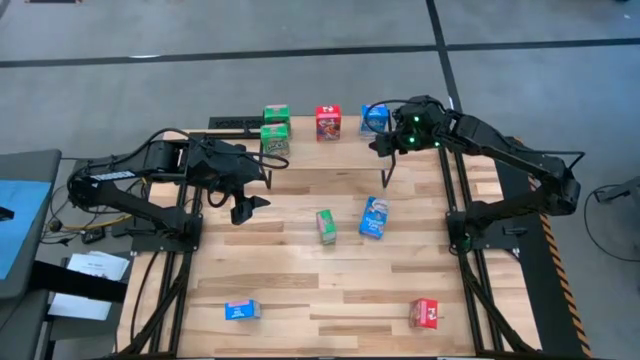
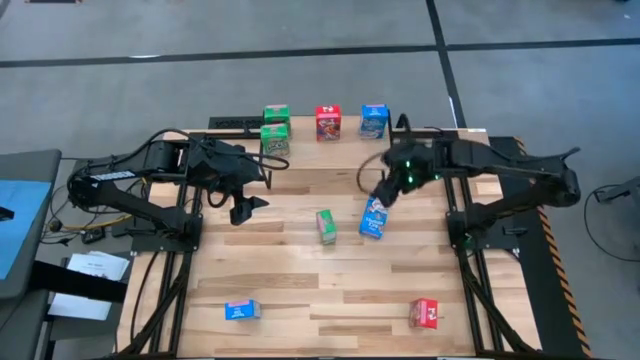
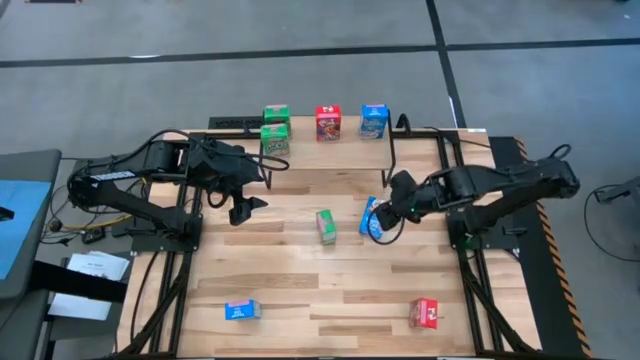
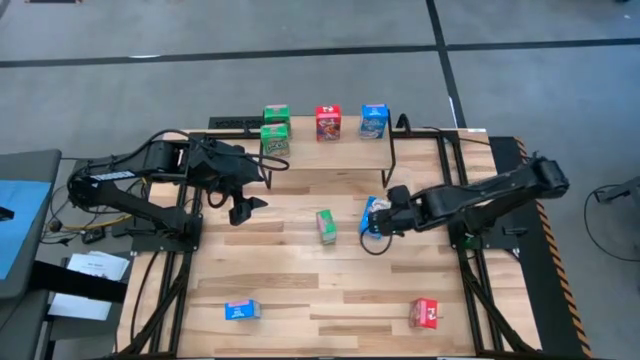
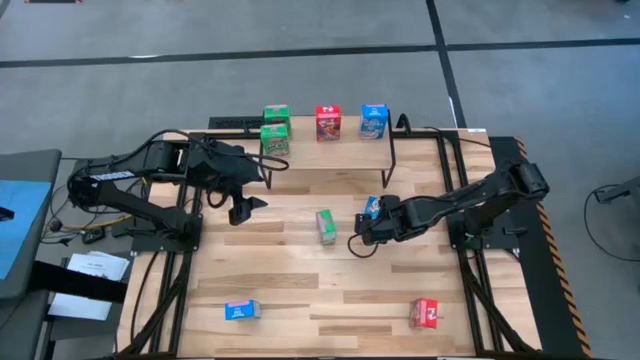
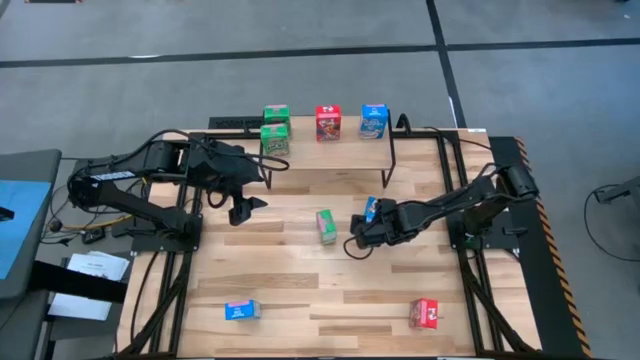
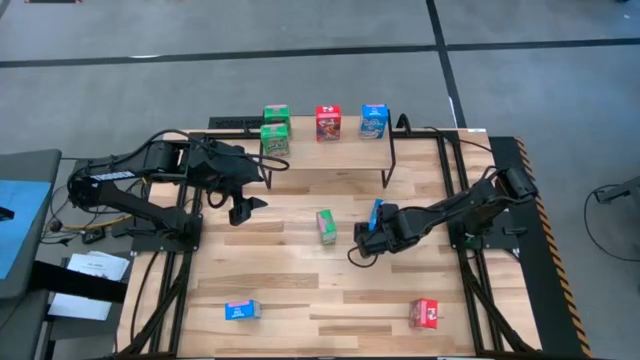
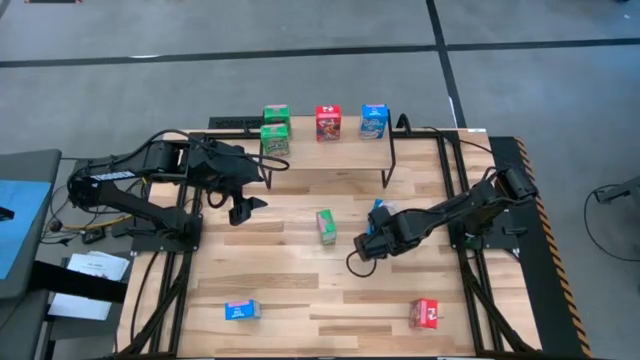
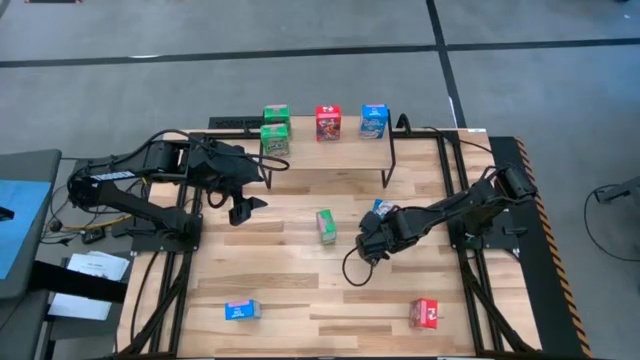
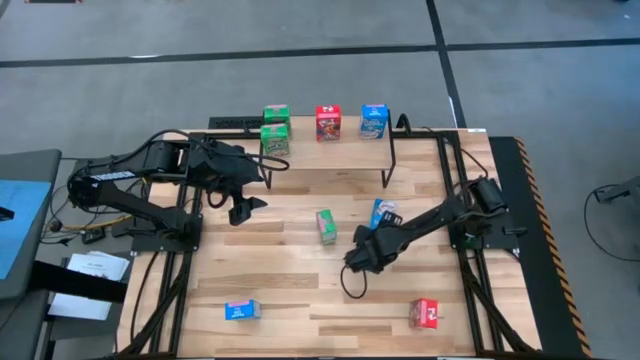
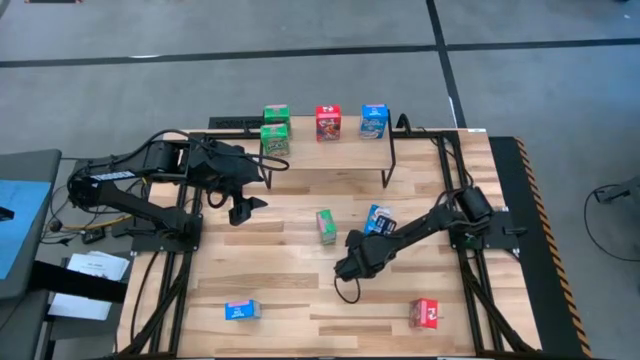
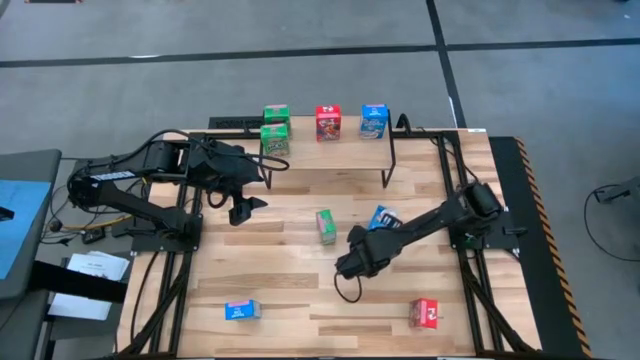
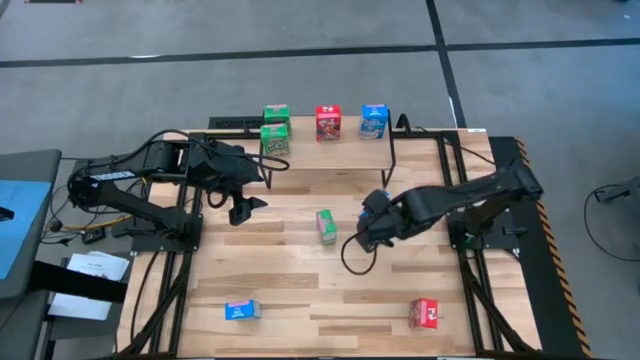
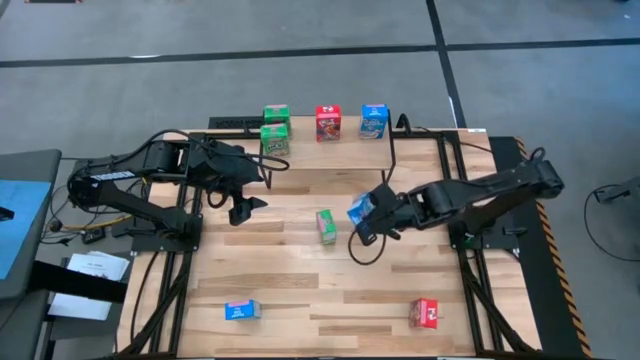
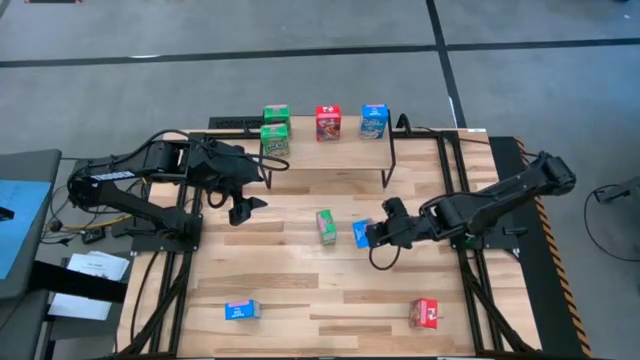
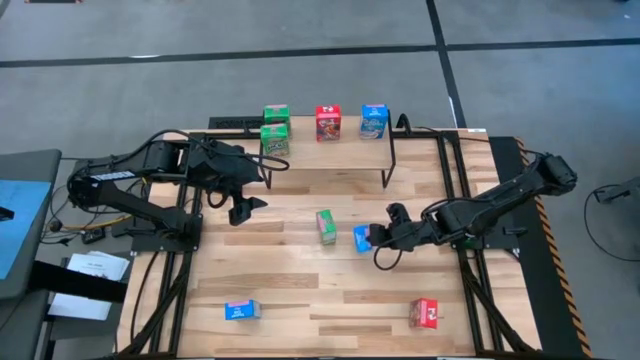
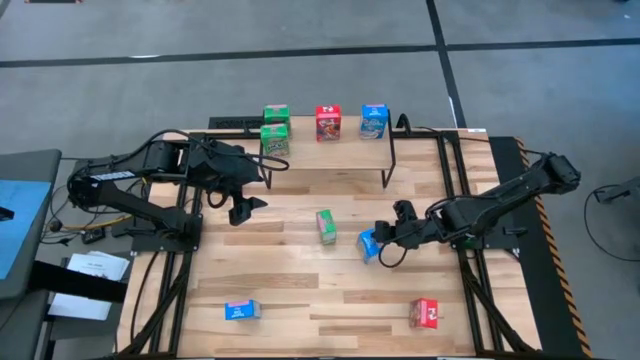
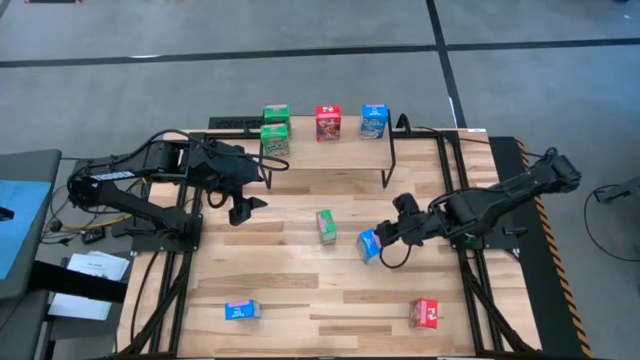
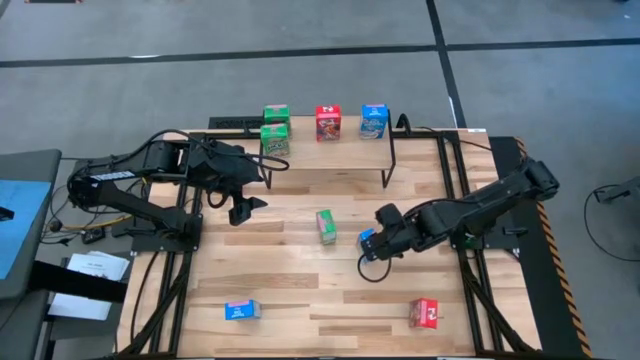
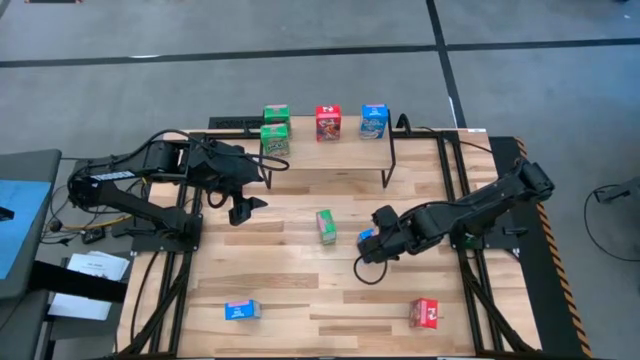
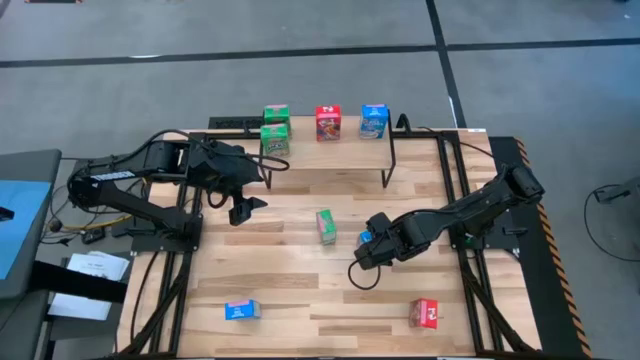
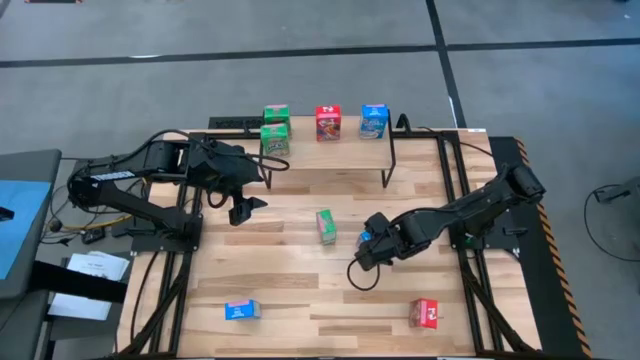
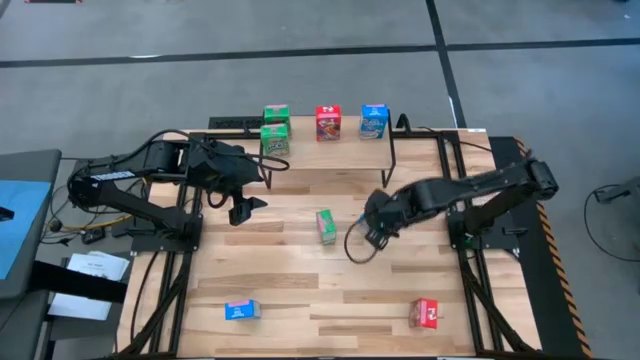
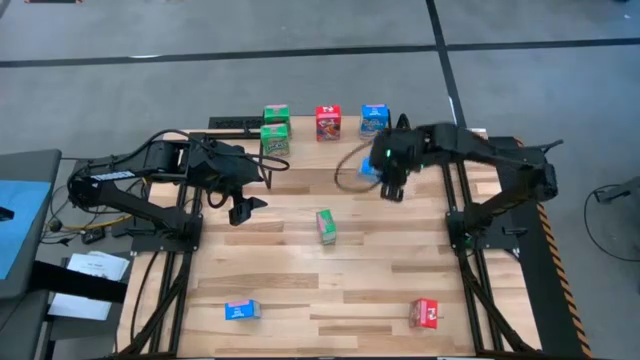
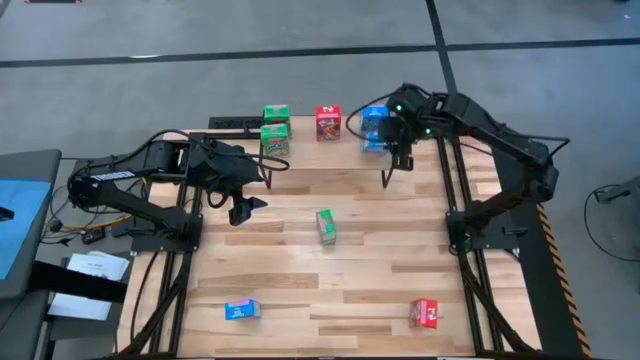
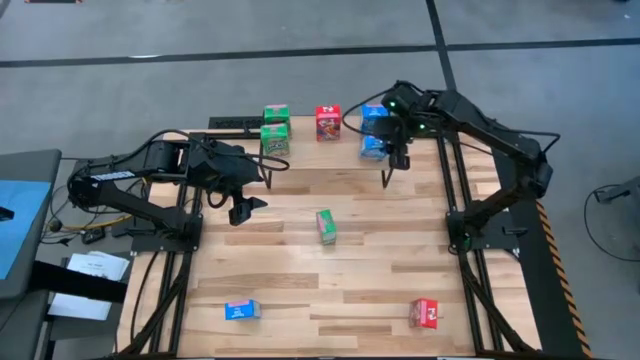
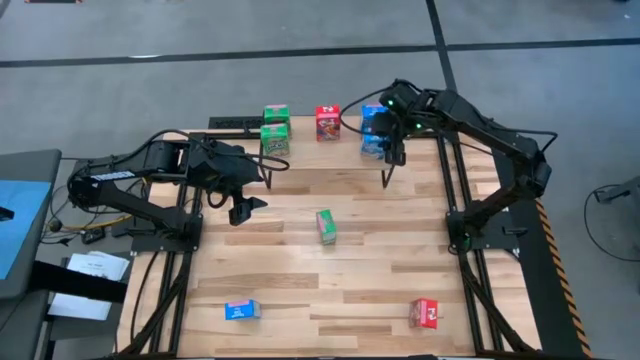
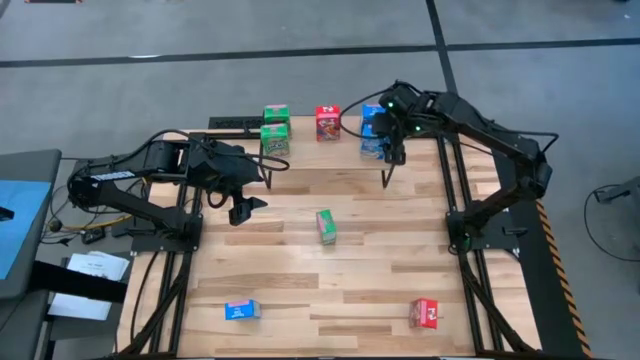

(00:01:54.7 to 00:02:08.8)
Task: Stack cereal on shelf
Put the right blue cereal box on the shelf aligned with the other blue cereal box

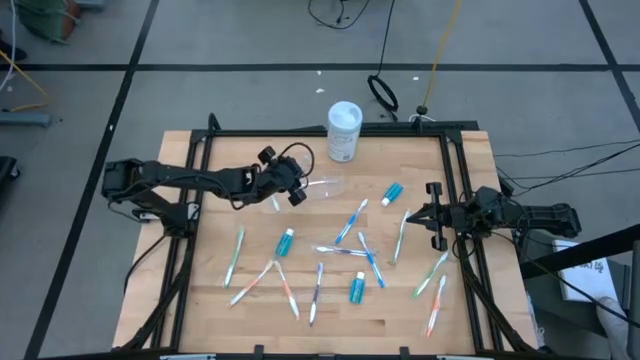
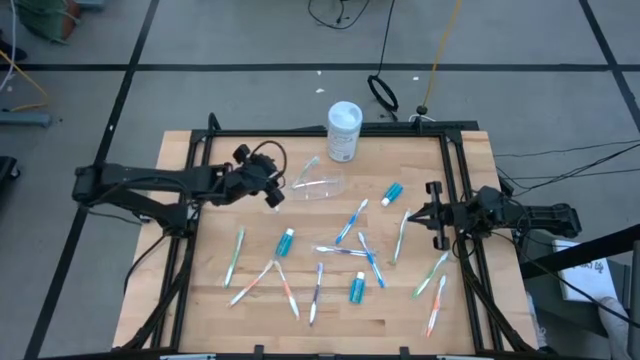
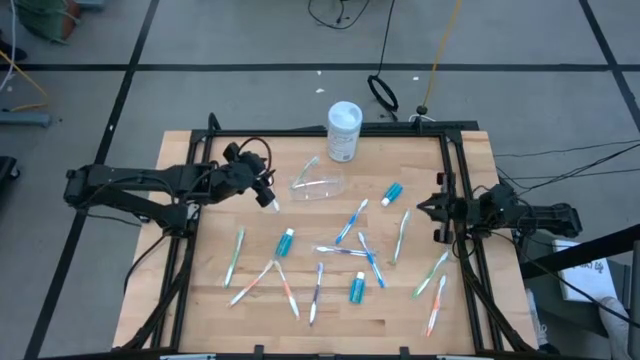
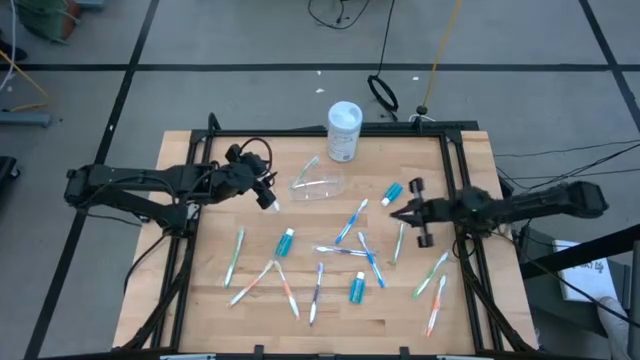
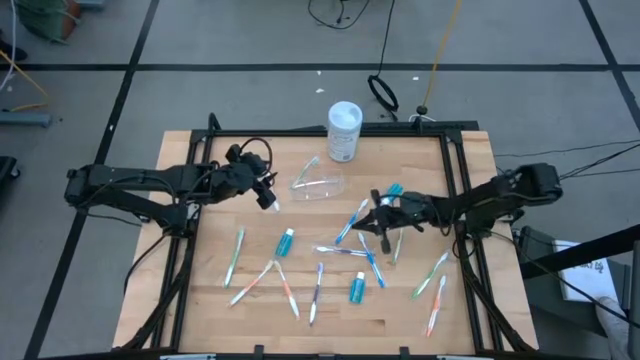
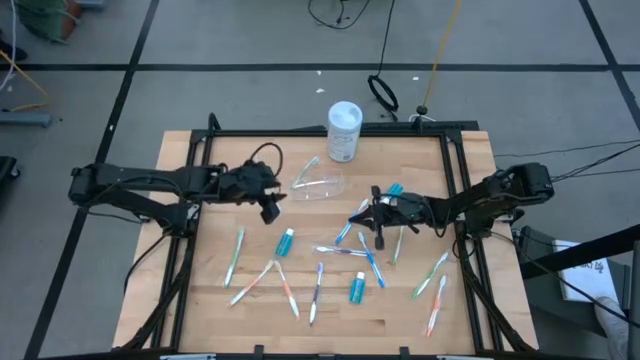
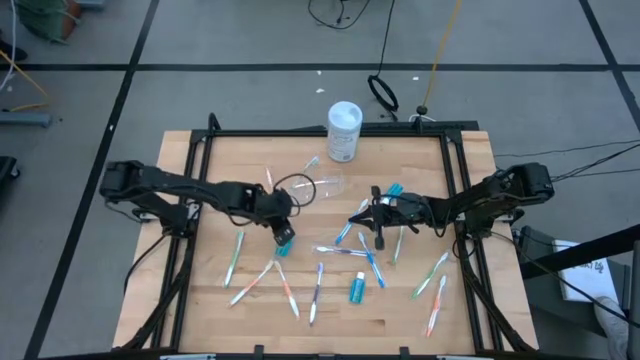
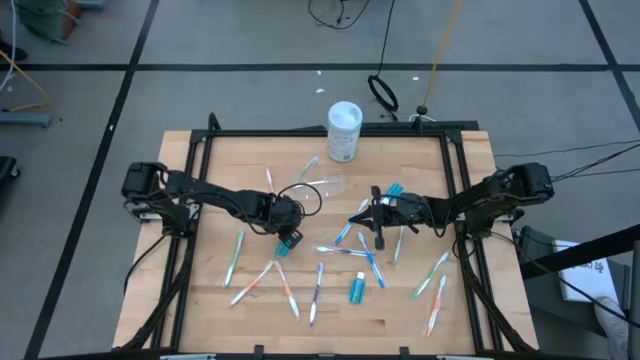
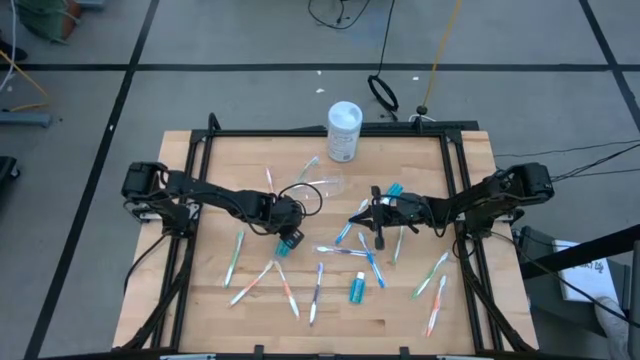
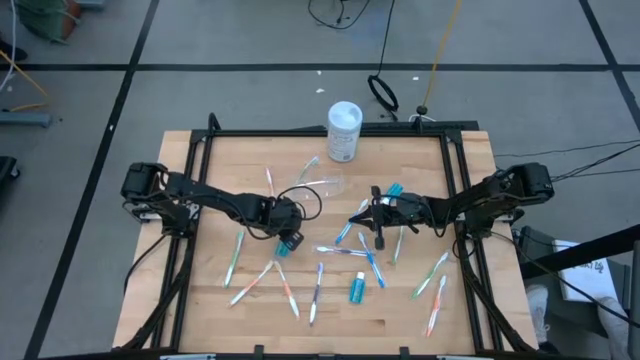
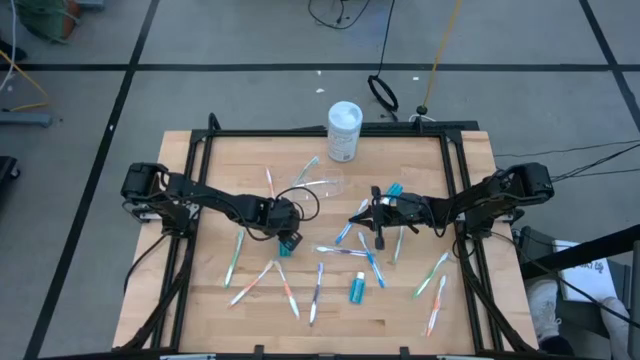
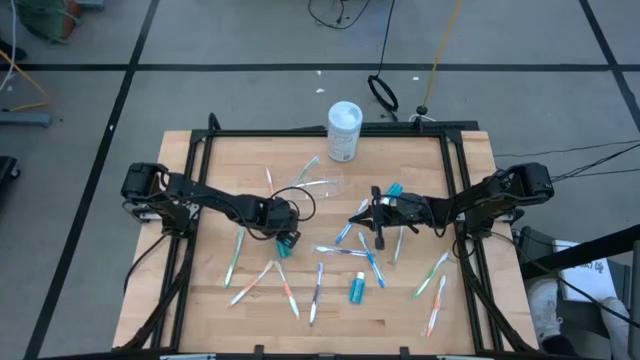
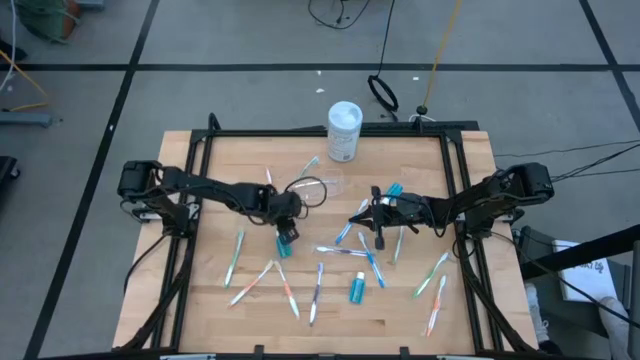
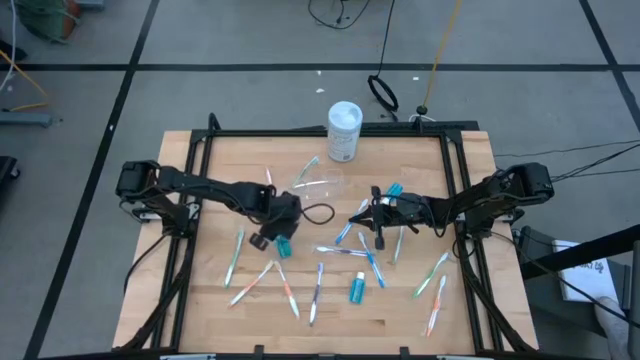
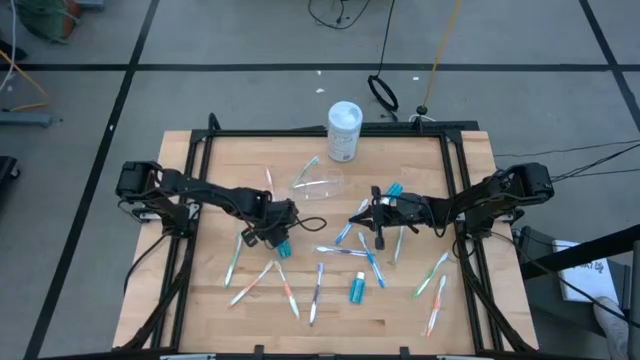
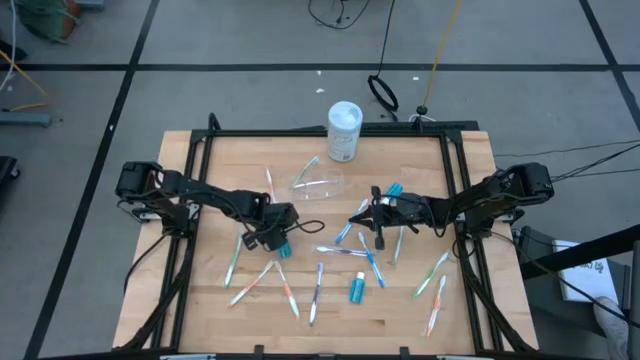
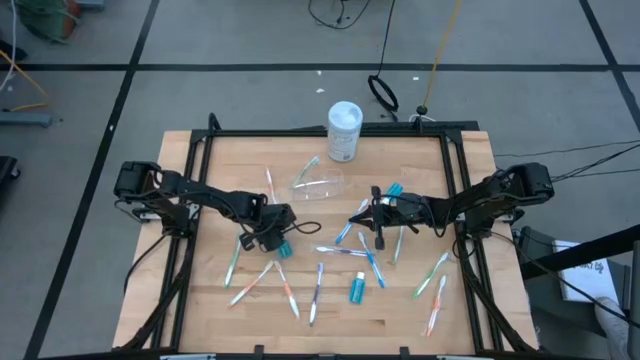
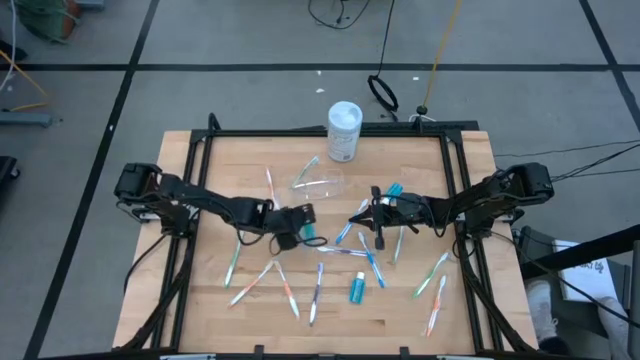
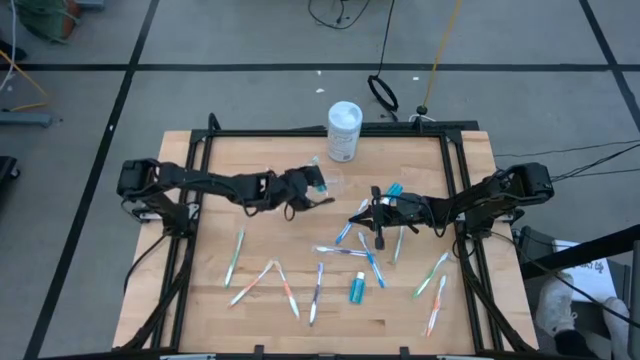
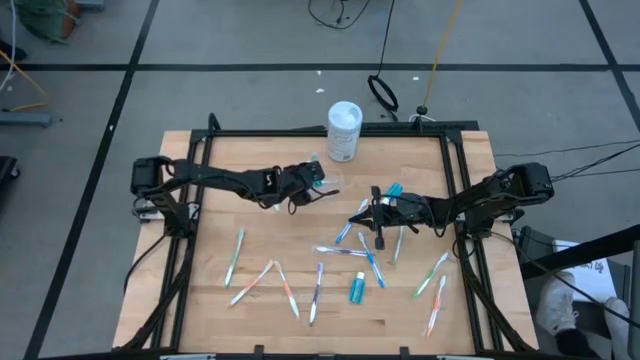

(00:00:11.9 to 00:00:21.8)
Task: Pick & Place toothbrushing station
Put the blue mouthwash into the transparent organizer
